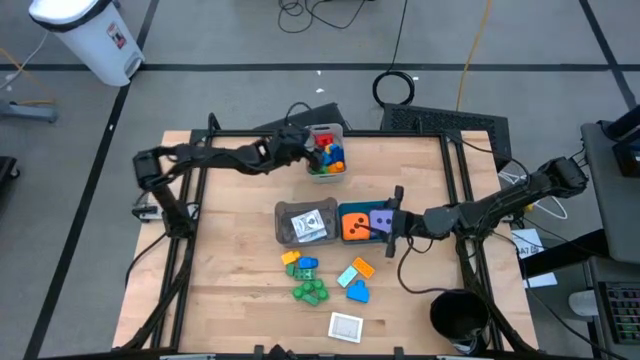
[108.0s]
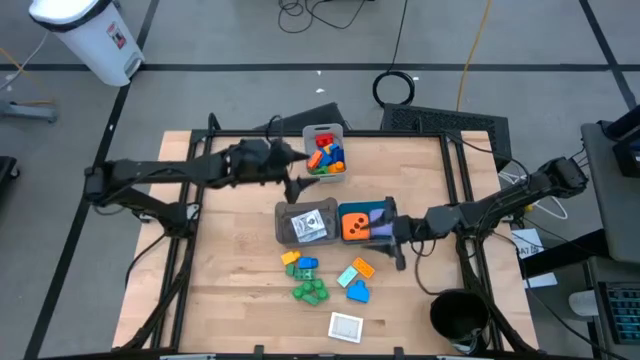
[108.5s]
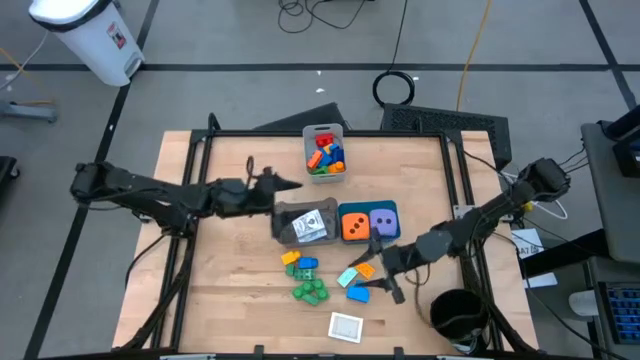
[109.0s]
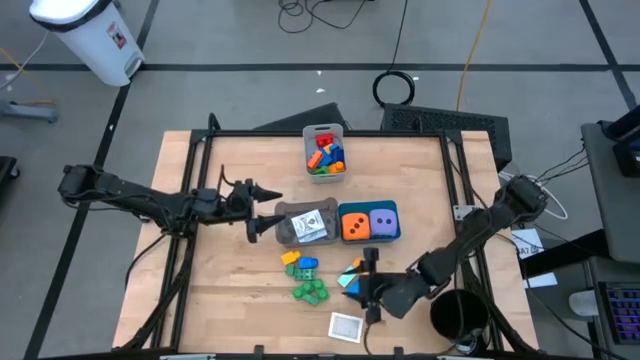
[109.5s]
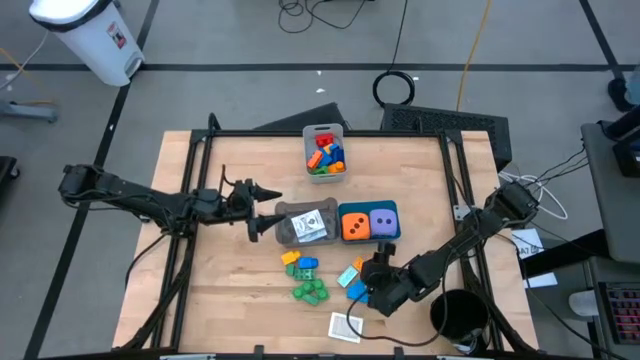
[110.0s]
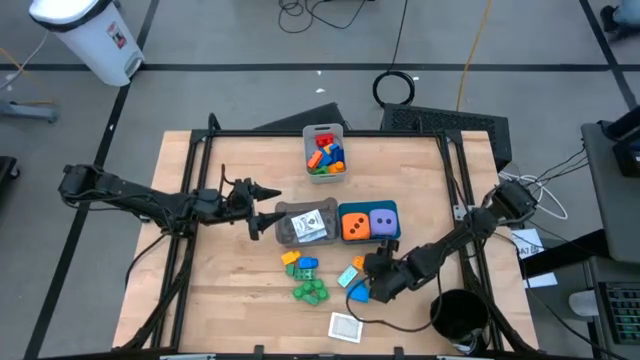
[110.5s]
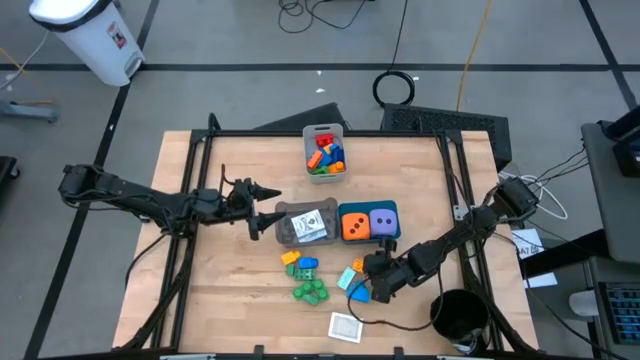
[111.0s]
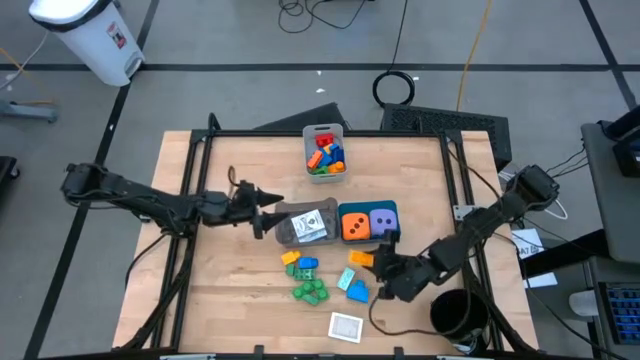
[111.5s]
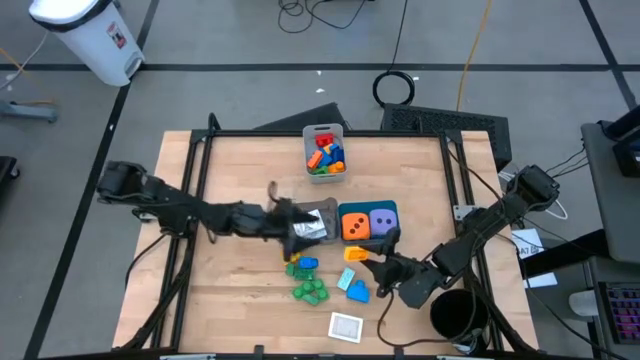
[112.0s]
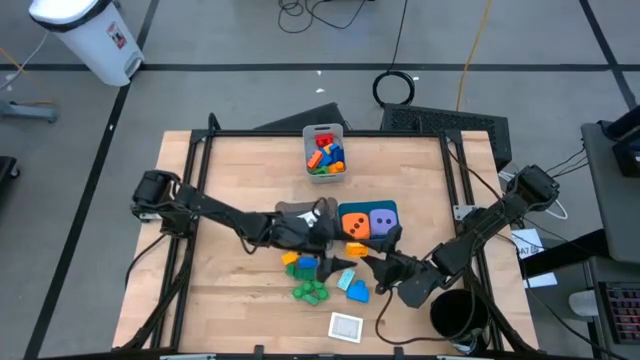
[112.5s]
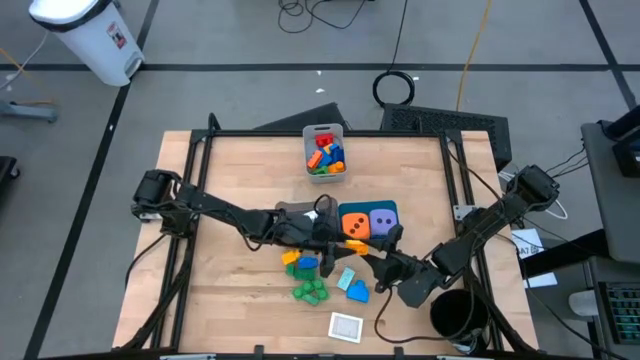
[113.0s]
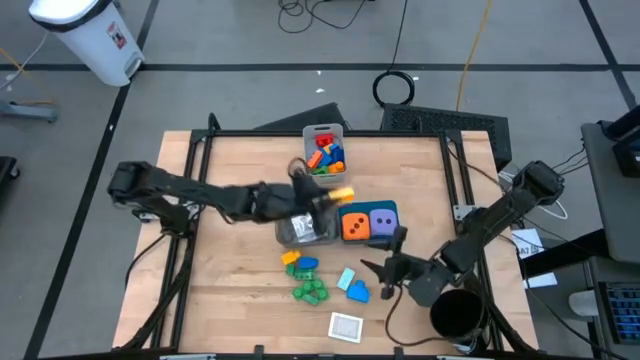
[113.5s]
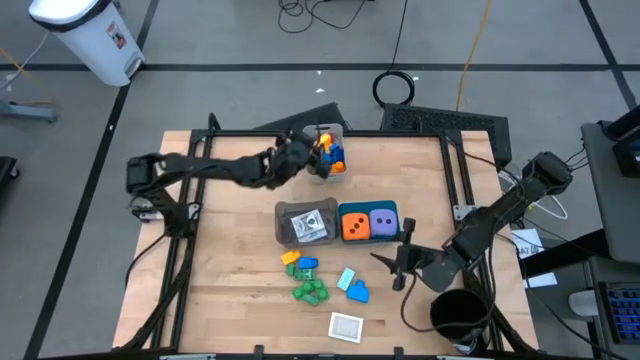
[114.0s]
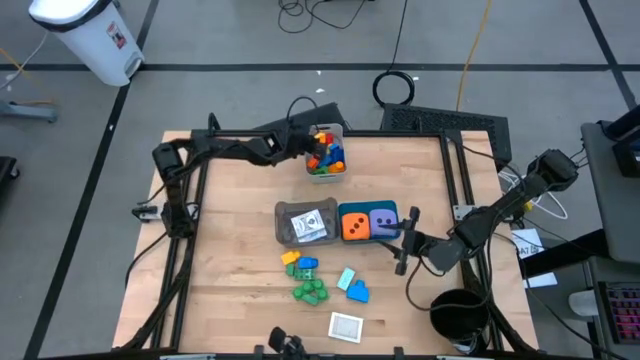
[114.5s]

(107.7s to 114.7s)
Task: Pick & Place Toys
Put the right yellow game piece into the gray bin

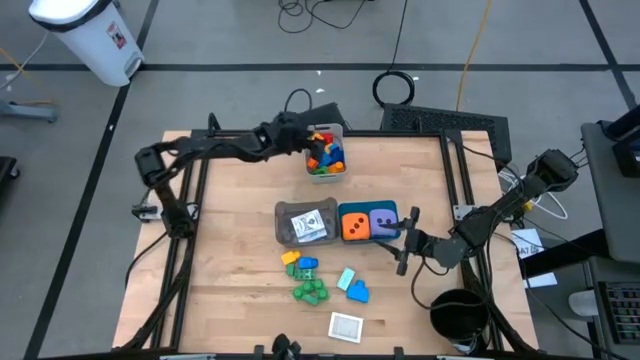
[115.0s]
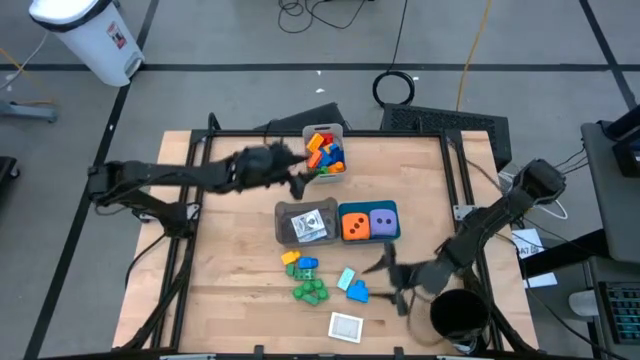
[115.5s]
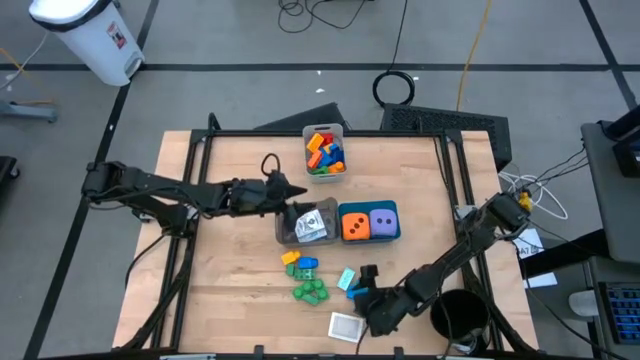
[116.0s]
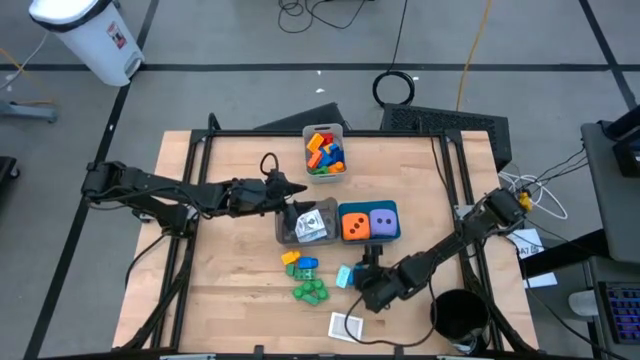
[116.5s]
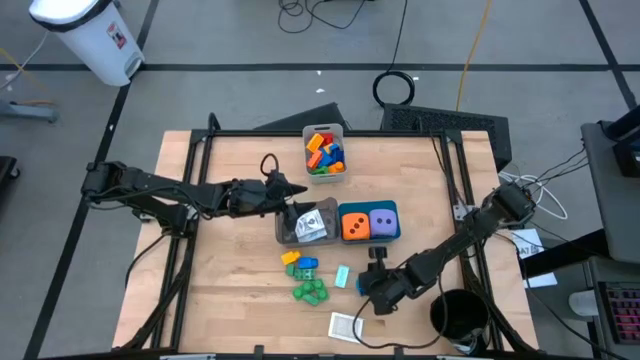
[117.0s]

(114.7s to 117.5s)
Put the blue game piece into the gray bin

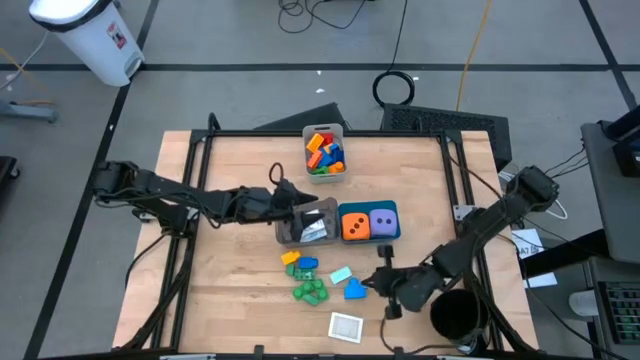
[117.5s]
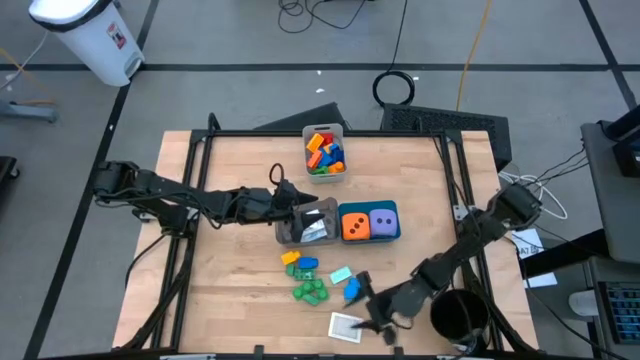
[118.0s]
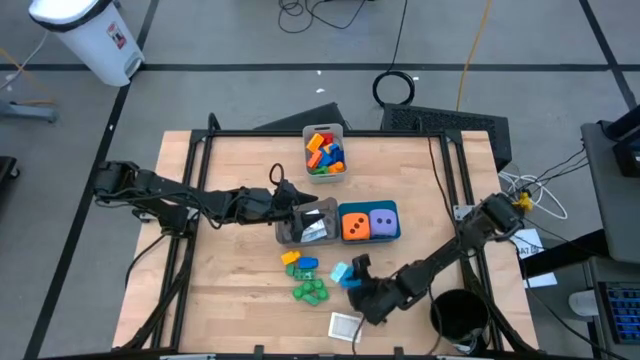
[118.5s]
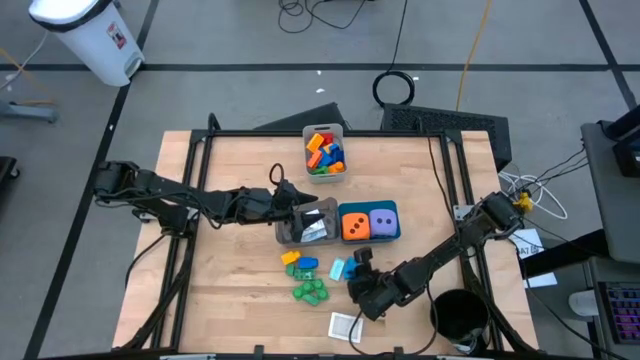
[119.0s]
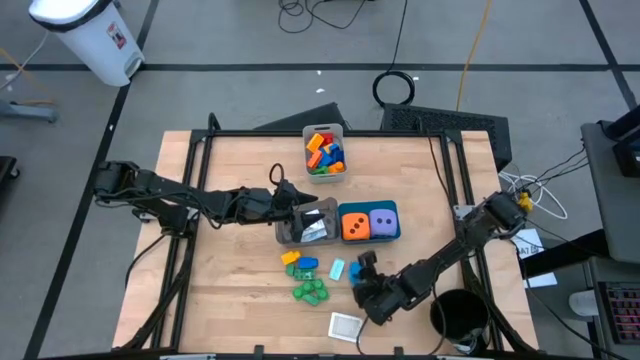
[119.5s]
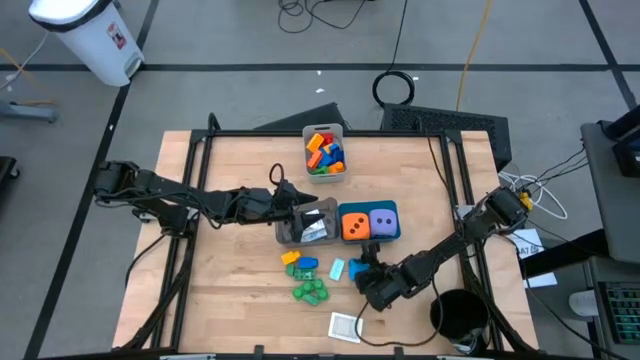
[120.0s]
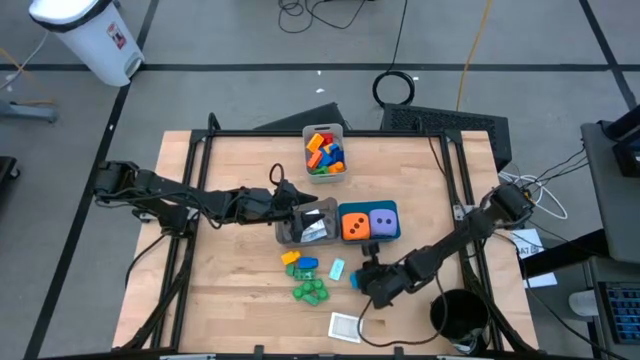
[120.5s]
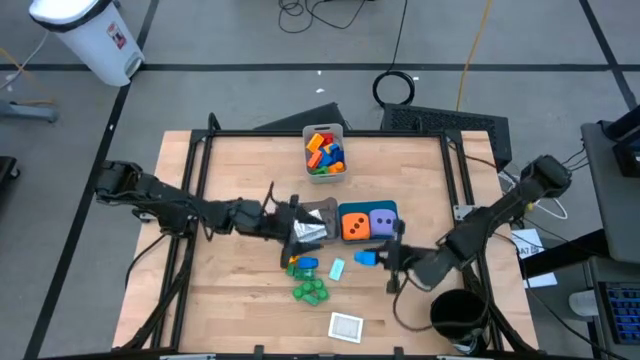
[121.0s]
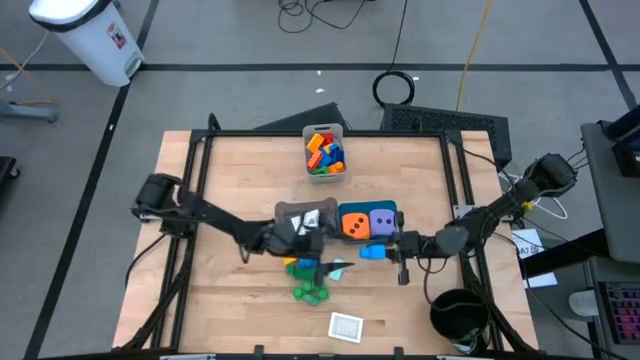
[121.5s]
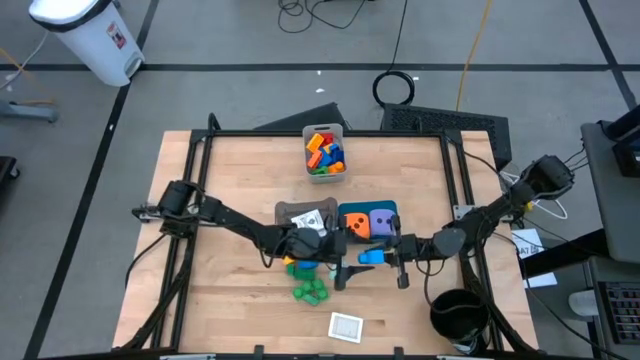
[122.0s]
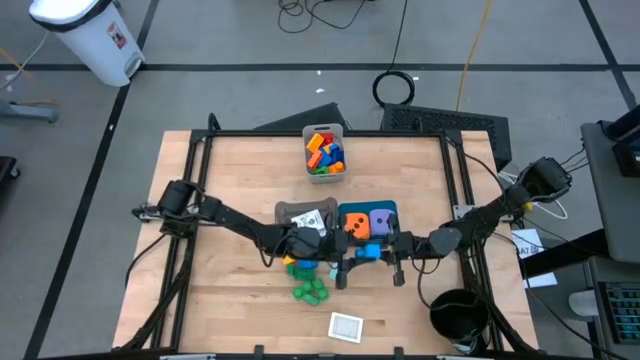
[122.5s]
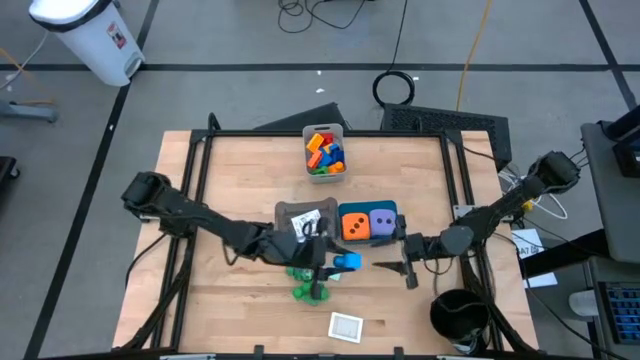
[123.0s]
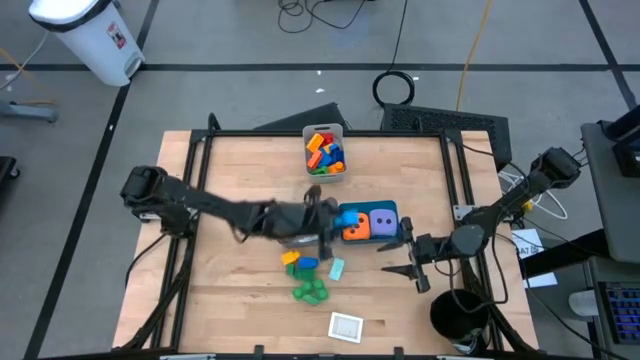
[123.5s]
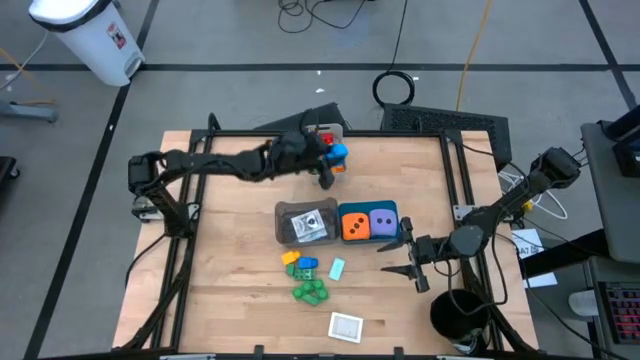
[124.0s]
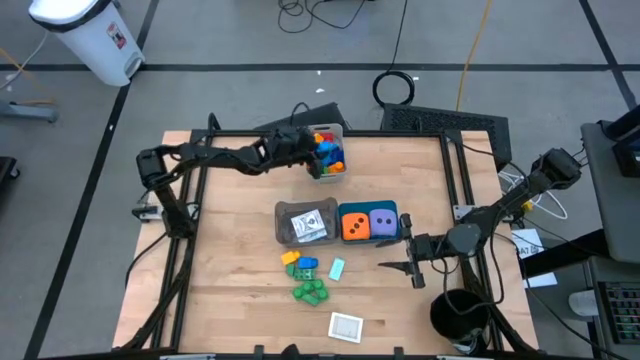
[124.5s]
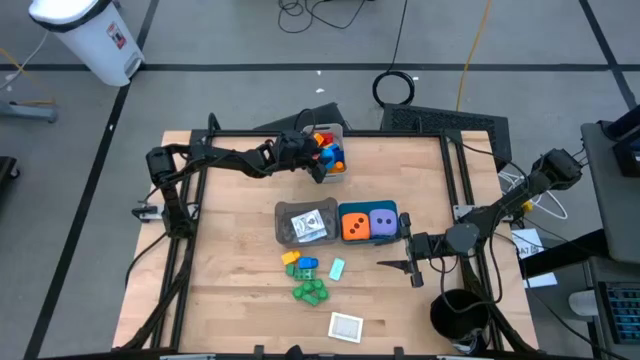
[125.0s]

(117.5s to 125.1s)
Put the blue game piece into the gray bin

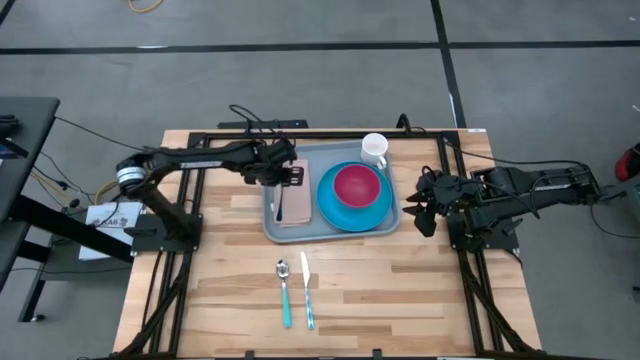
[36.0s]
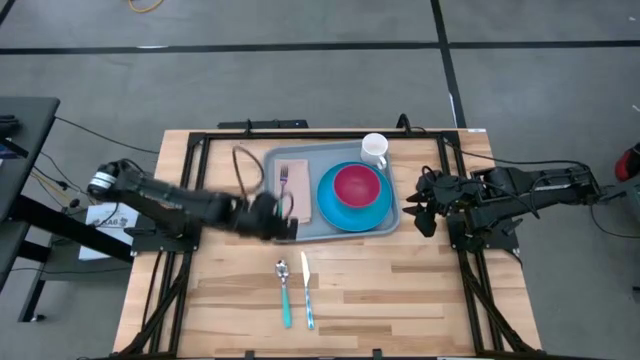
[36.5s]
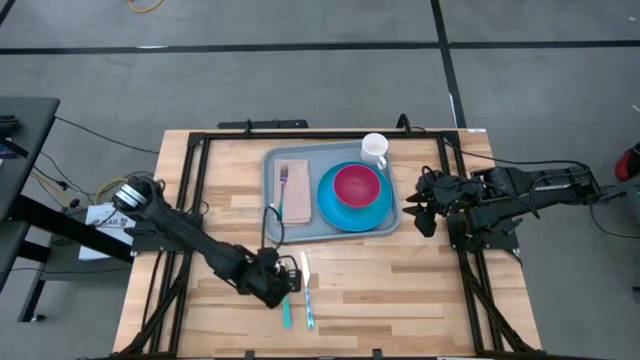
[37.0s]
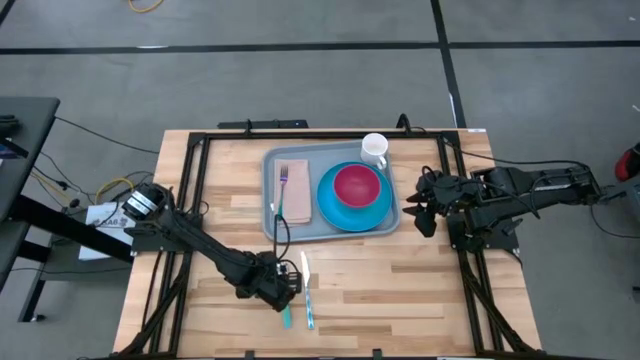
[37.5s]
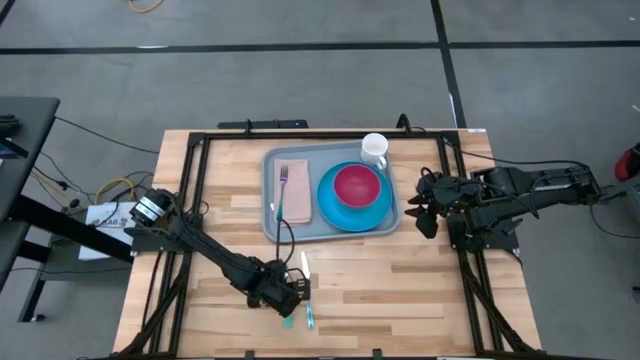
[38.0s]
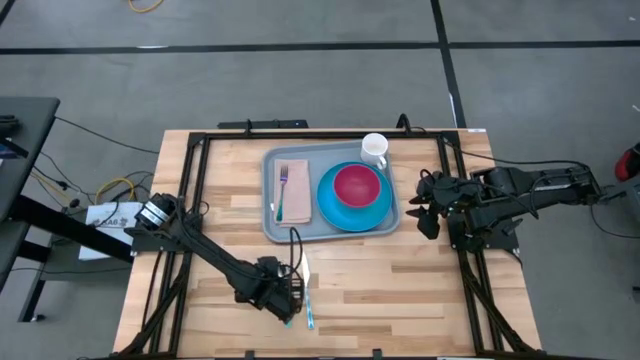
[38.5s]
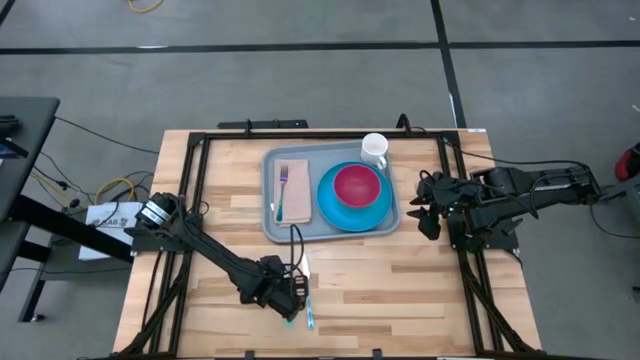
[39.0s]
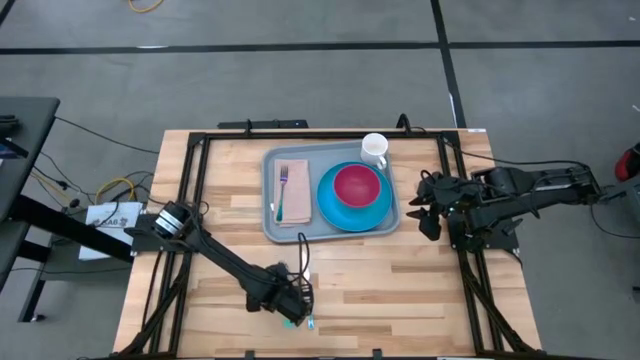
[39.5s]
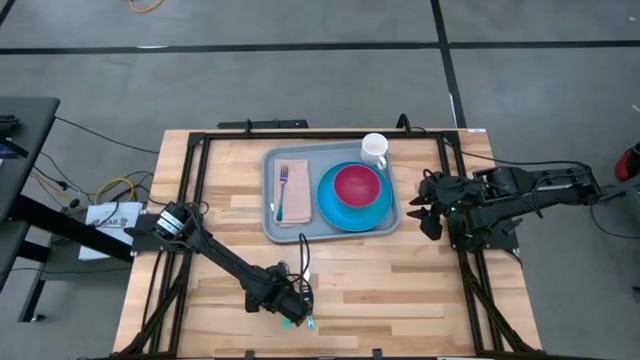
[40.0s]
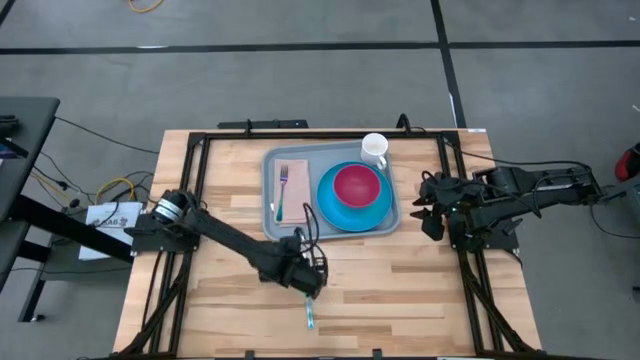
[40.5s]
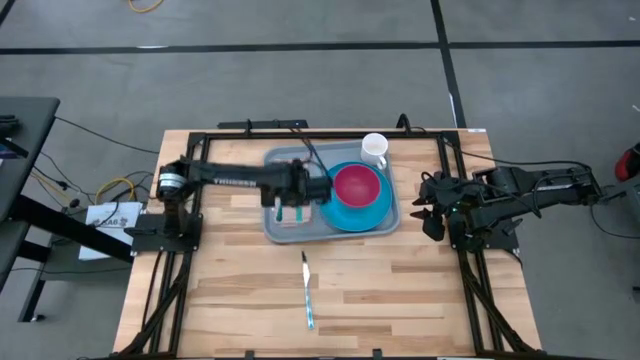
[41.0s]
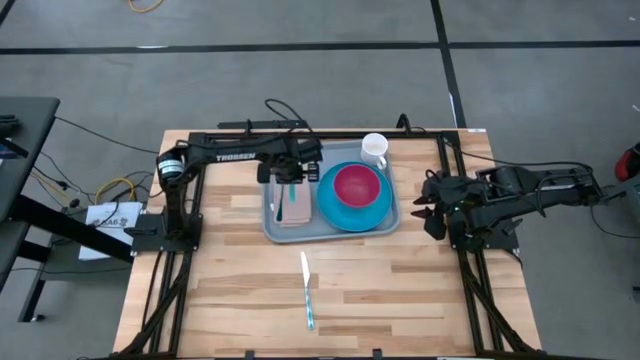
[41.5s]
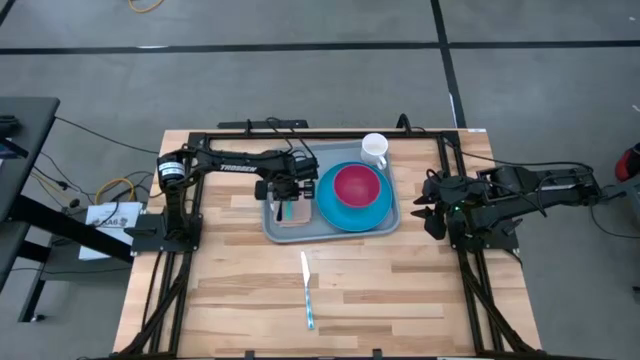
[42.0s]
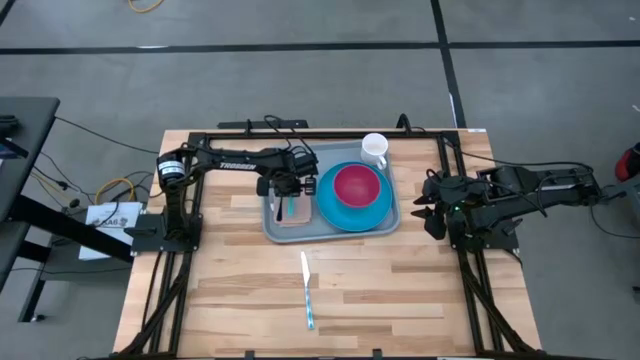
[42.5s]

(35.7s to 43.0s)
Task: Set up tray
Put the blue spoon on the brown napkin to the right of the blue fork on the blue tray
